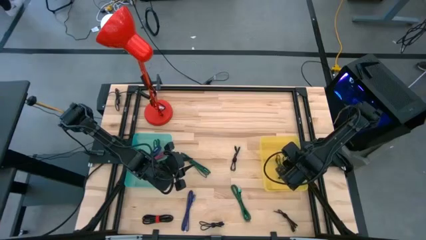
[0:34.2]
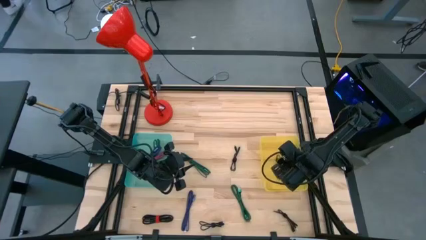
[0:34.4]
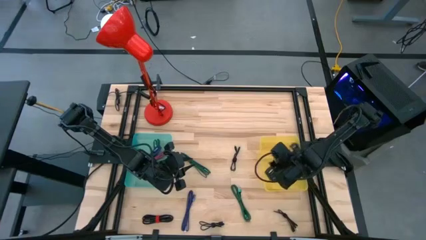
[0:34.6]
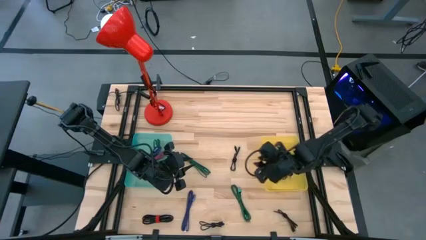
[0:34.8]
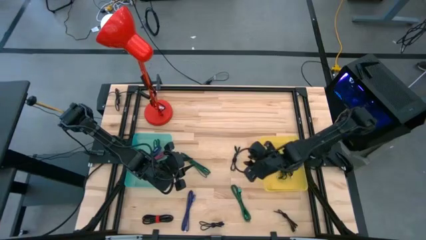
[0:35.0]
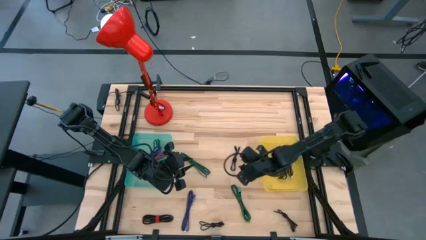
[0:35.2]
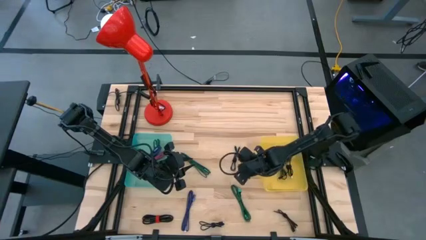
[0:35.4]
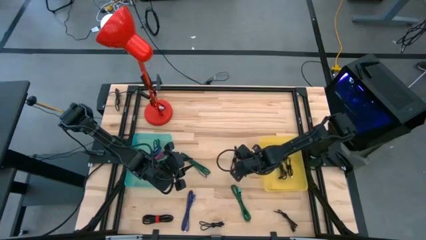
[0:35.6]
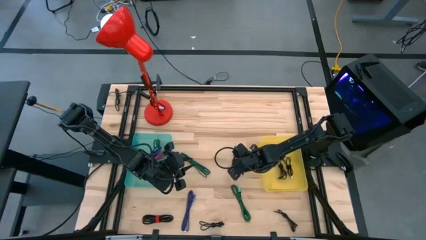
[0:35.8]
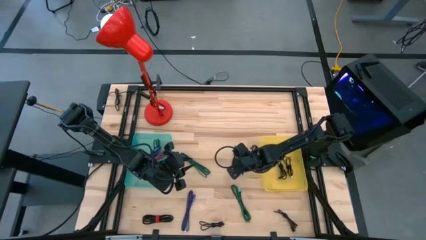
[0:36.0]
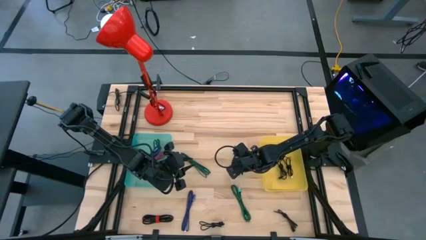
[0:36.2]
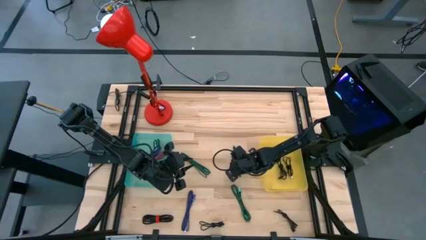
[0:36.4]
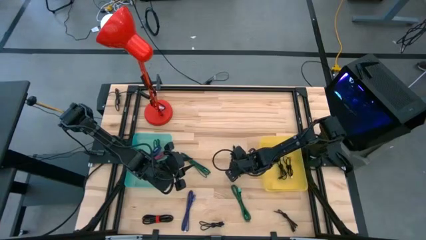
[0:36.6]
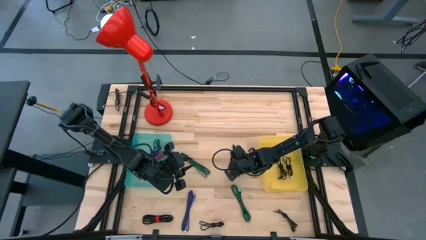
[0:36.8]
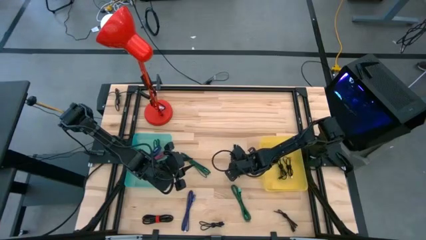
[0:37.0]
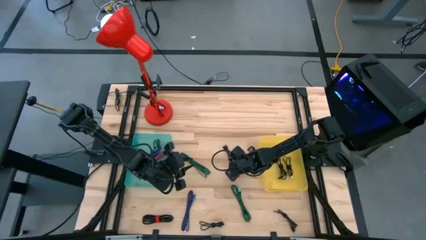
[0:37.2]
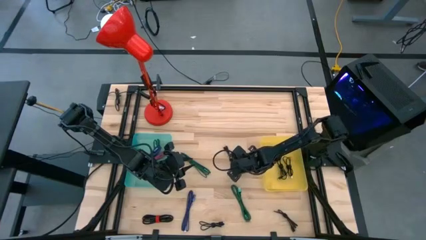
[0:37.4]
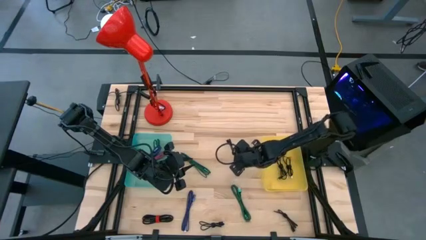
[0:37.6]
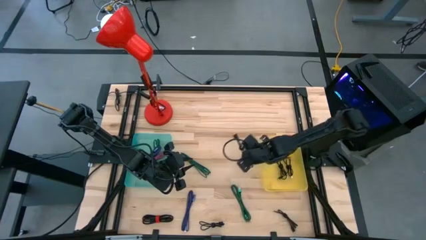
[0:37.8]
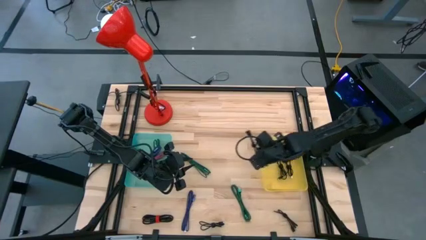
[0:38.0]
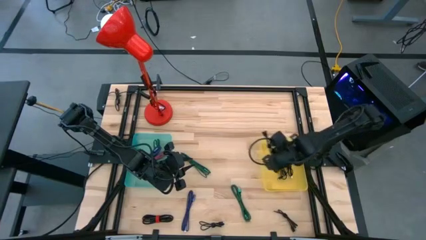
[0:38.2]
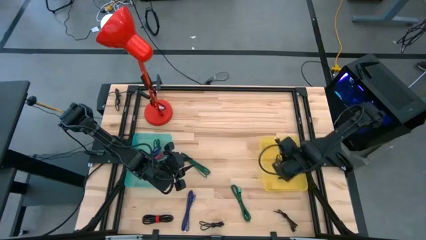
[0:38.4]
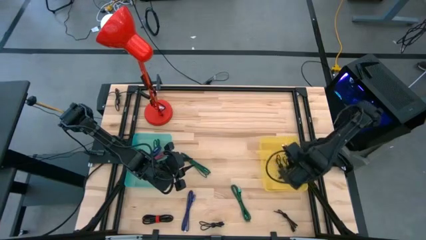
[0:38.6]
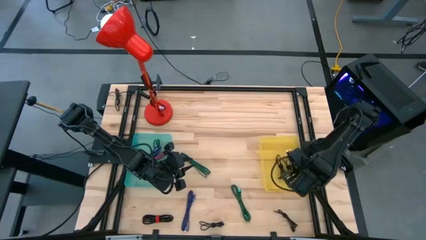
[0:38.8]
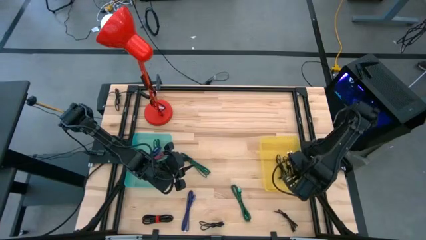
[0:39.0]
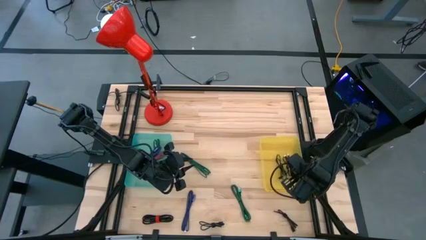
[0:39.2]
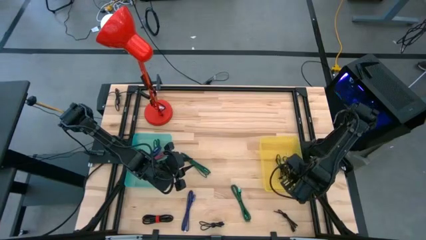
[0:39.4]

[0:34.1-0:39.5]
Task: Pick & Place USB Port
Put the black charger cable into the yellow bin

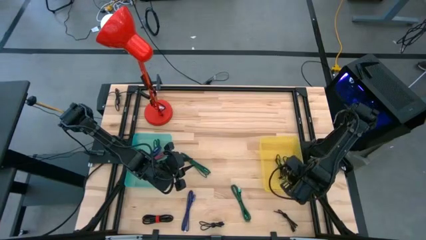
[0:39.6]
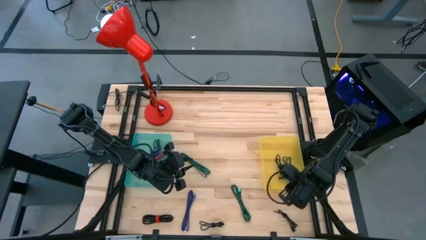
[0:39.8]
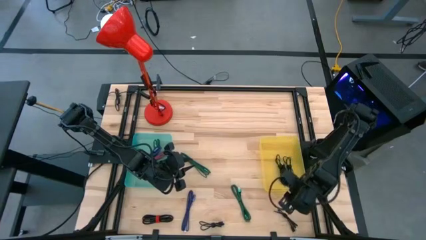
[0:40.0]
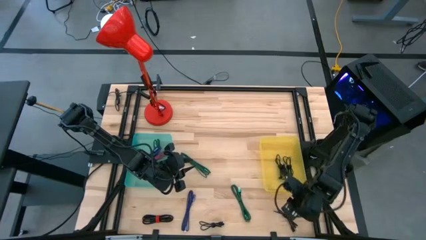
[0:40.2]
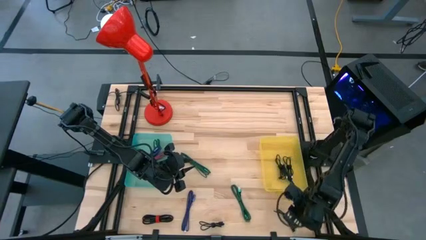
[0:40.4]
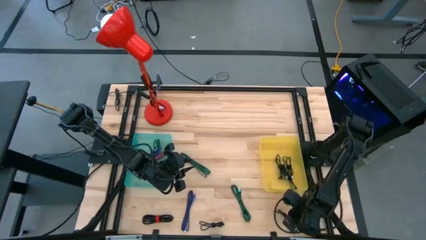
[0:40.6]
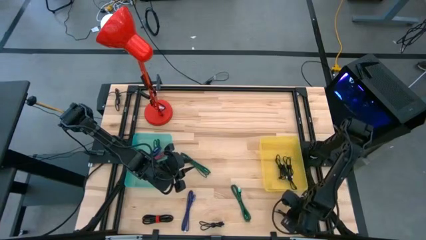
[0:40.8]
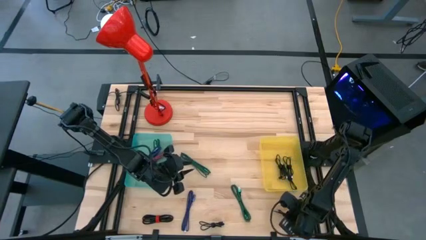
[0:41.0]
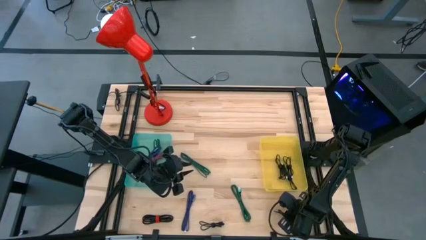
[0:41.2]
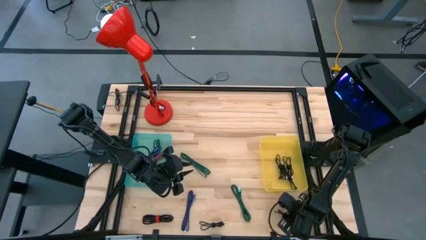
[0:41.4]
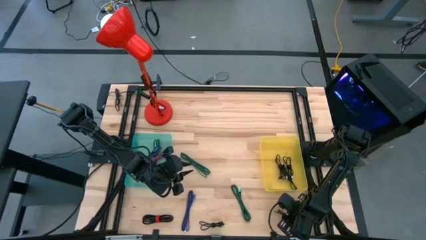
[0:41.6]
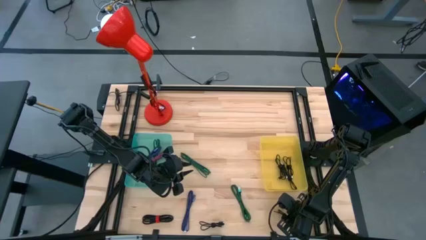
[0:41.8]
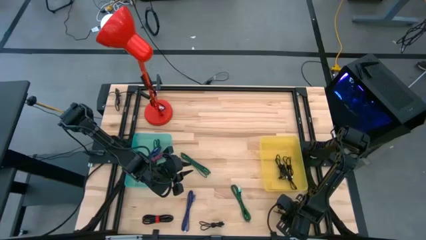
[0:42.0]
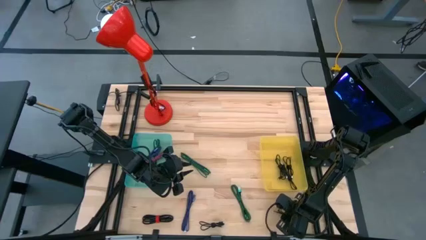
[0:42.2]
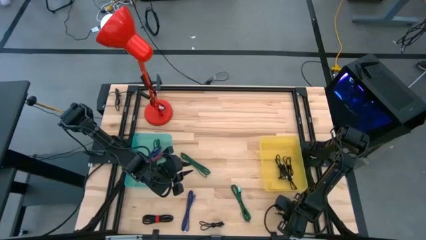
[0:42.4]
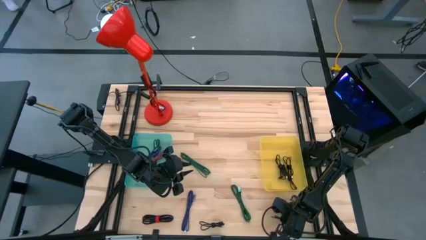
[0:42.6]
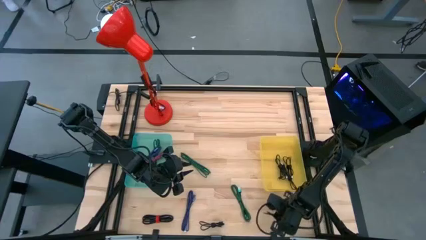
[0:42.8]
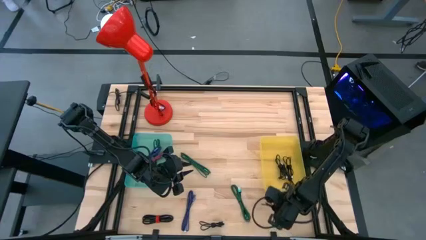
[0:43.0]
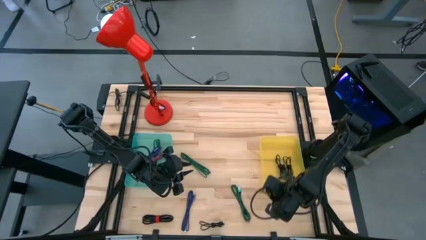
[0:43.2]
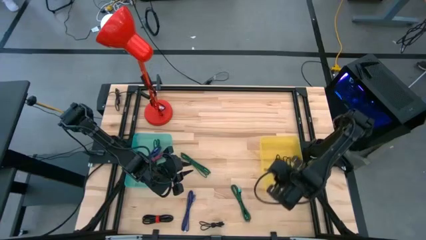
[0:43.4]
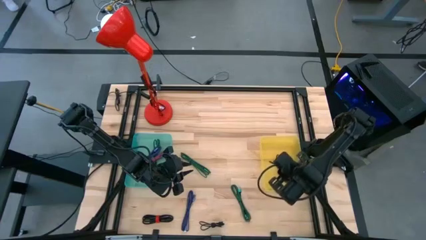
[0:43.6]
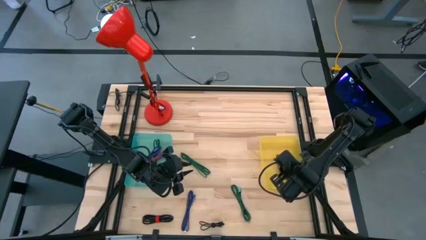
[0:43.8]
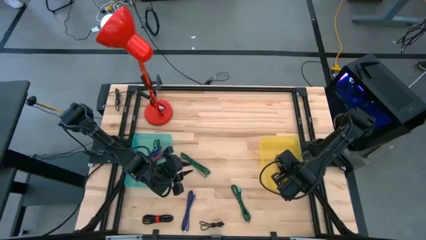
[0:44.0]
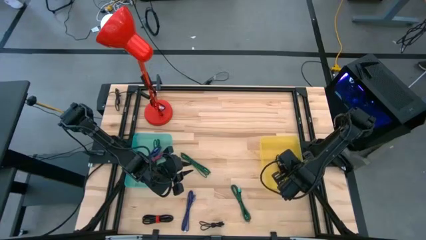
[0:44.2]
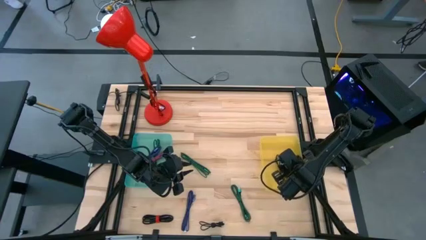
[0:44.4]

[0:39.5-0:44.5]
Put the black charger cable into the yellow bin

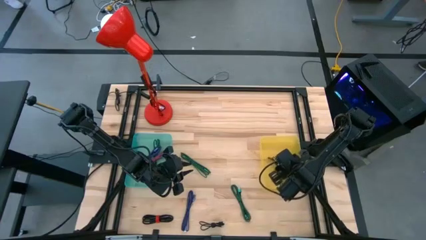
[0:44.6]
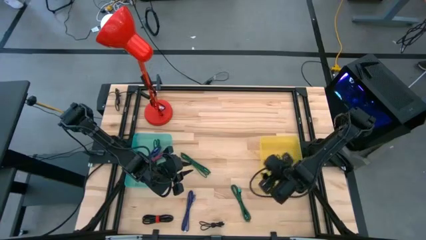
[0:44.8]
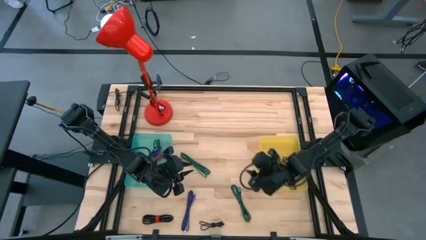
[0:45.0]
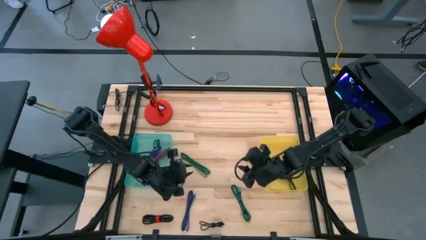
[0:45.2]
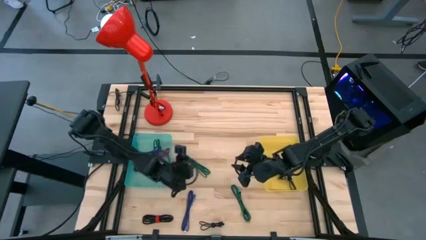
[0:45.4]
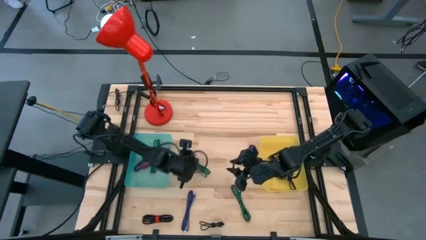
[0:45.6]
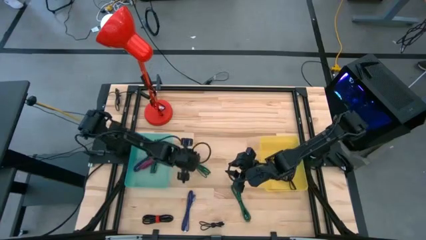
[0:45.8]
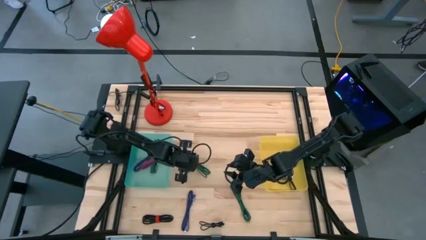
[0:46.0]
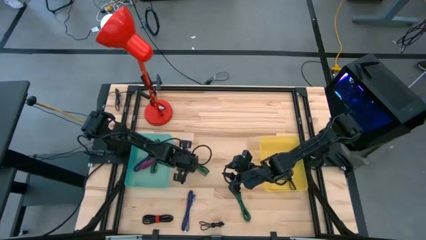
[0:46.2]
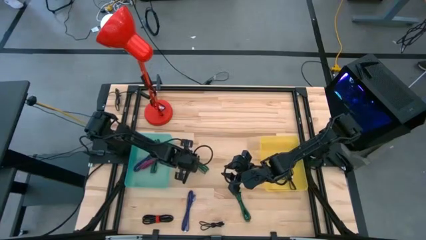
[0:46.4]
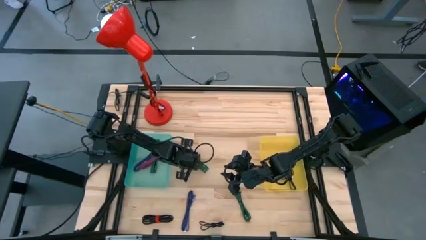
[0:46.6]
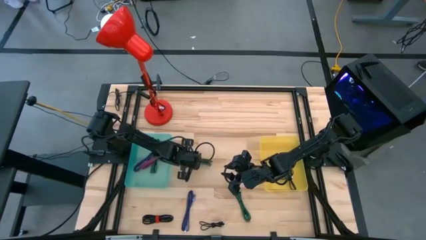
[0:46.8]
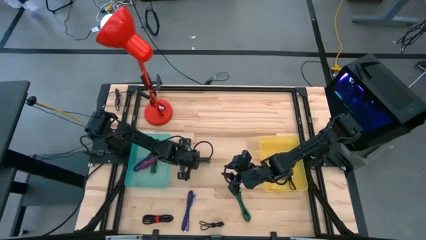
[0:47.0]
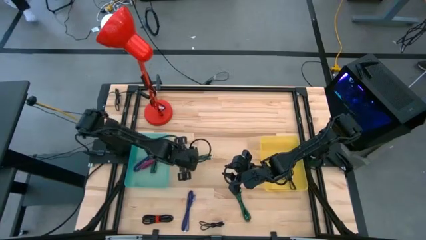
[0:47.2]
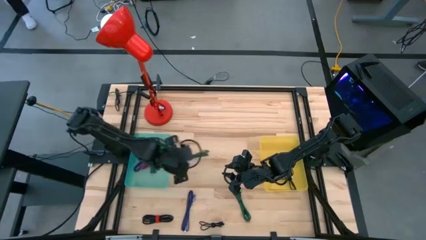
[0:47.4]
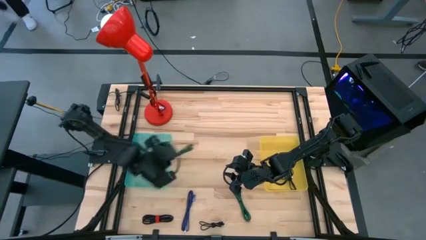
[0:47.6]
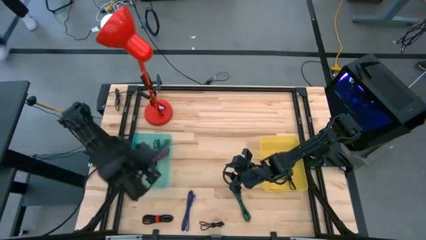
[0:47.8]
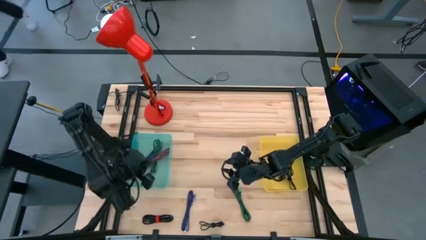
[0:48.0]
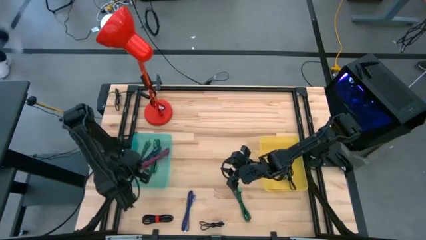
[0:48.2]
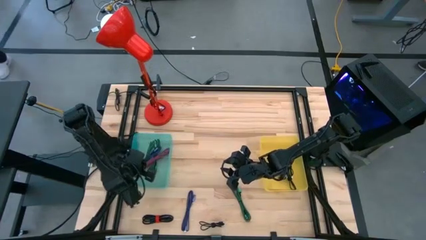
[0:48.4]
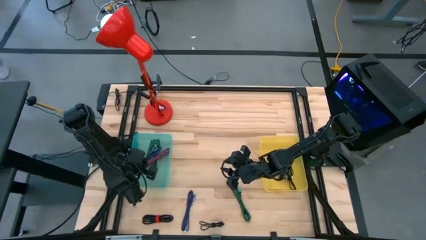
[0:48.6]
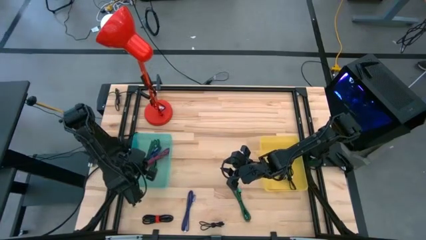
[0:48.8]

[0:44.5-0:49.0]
Put the left green charger cable into the green bin
